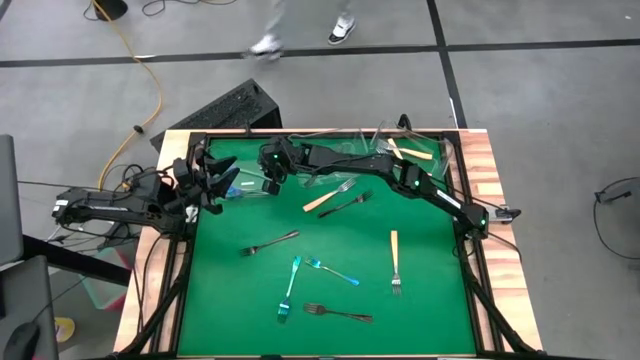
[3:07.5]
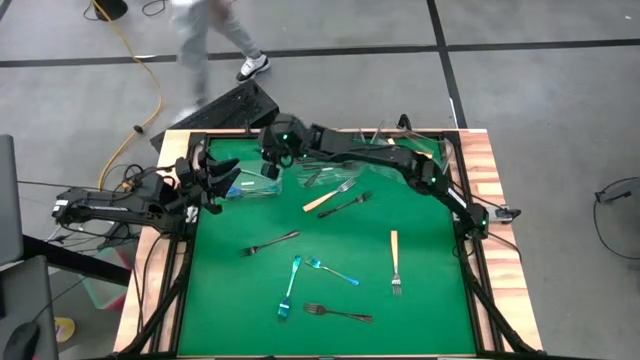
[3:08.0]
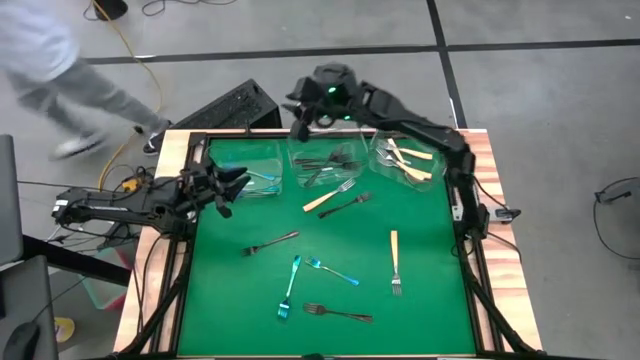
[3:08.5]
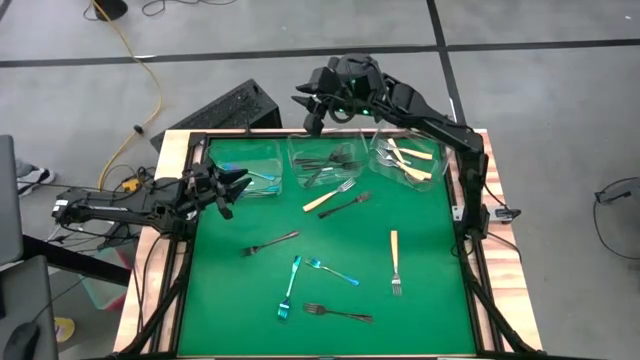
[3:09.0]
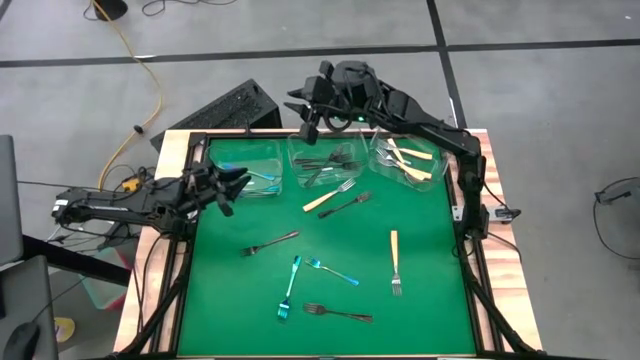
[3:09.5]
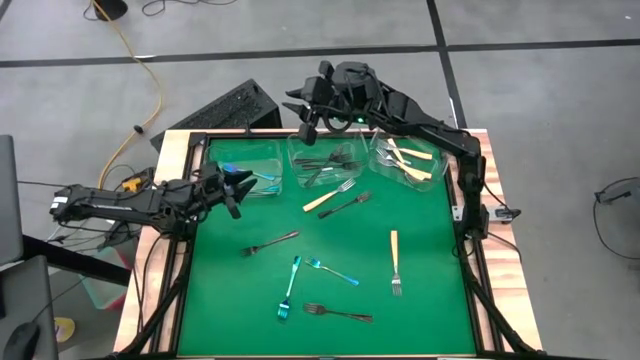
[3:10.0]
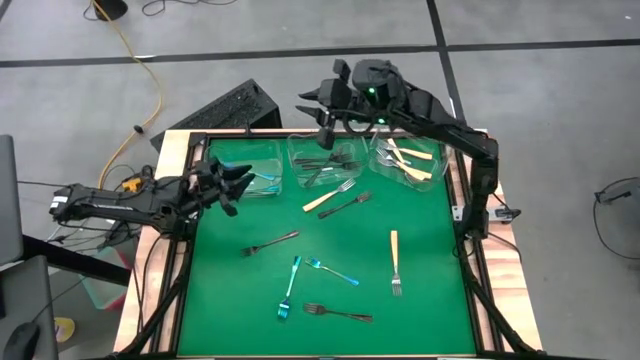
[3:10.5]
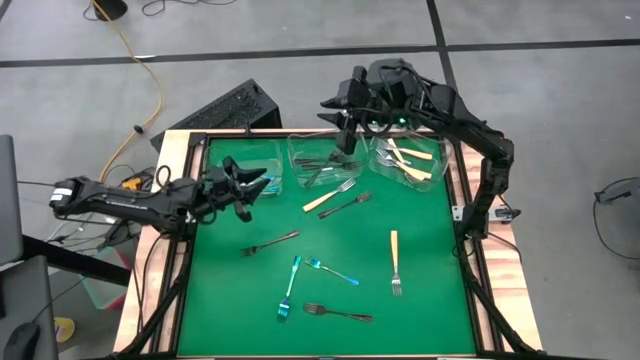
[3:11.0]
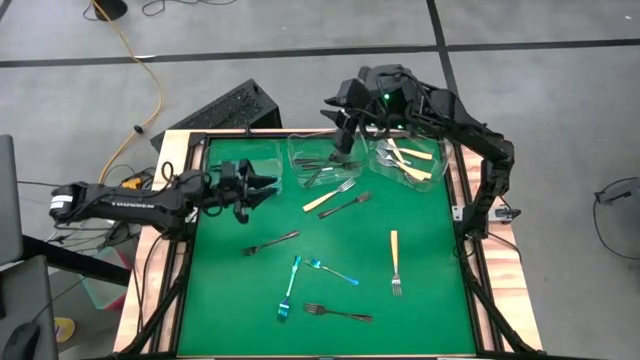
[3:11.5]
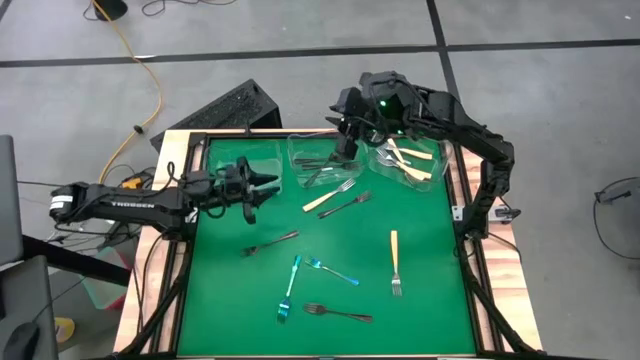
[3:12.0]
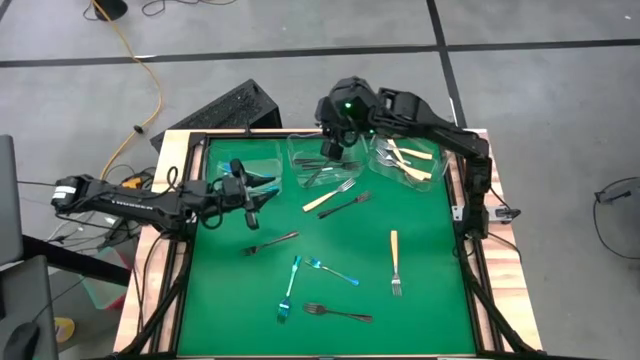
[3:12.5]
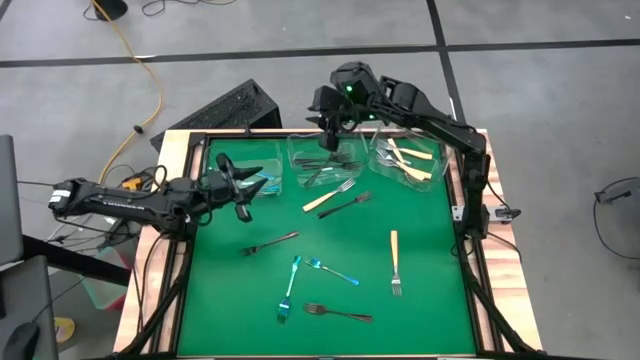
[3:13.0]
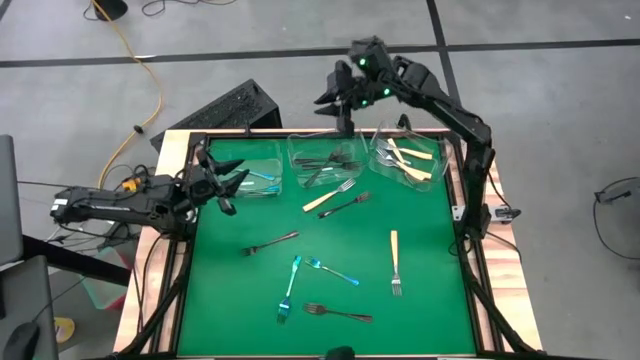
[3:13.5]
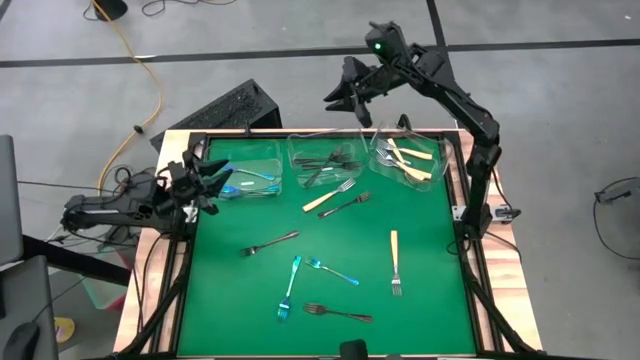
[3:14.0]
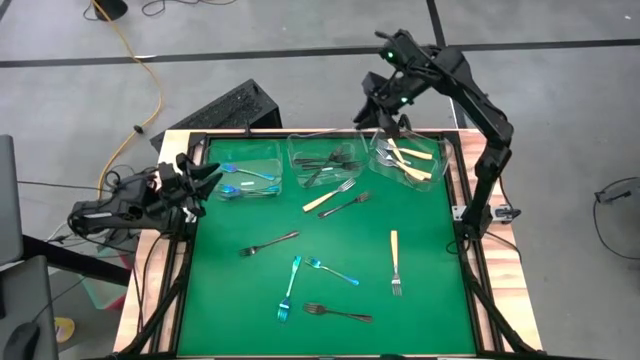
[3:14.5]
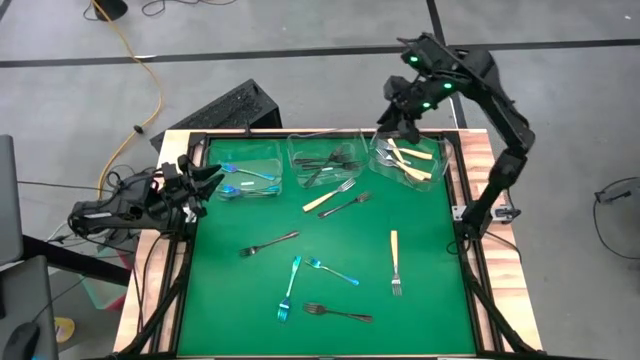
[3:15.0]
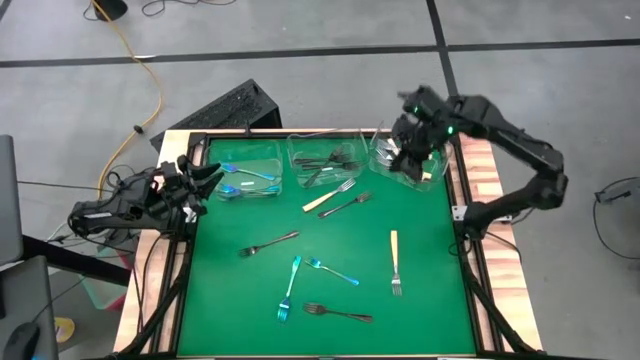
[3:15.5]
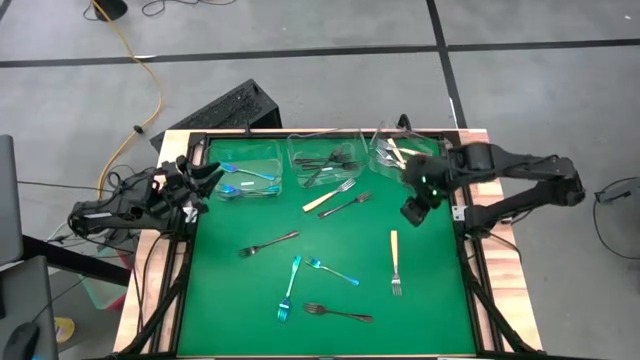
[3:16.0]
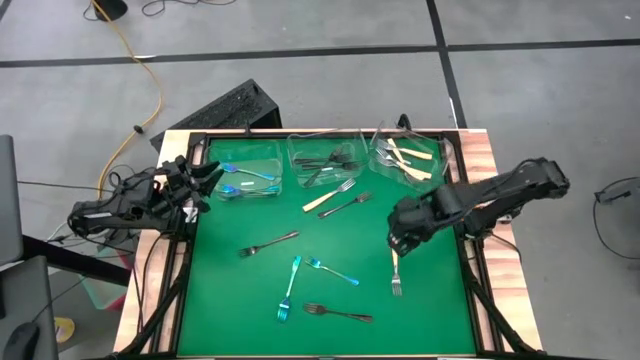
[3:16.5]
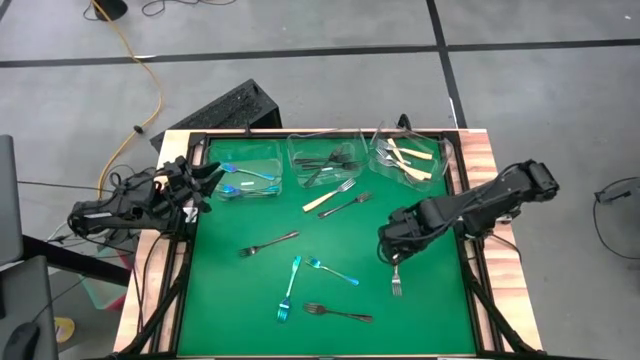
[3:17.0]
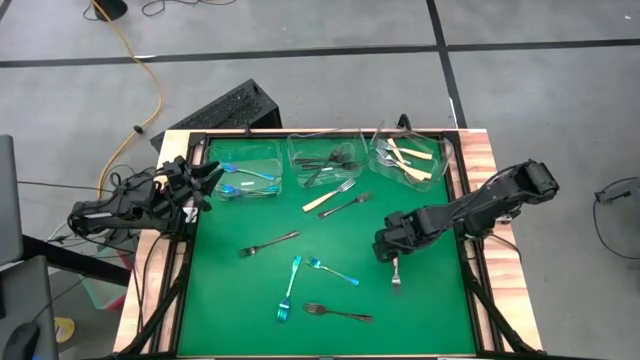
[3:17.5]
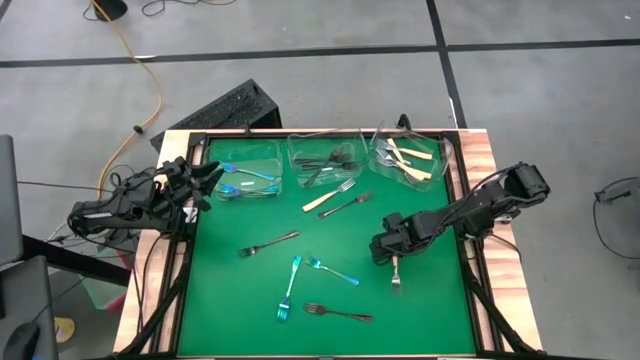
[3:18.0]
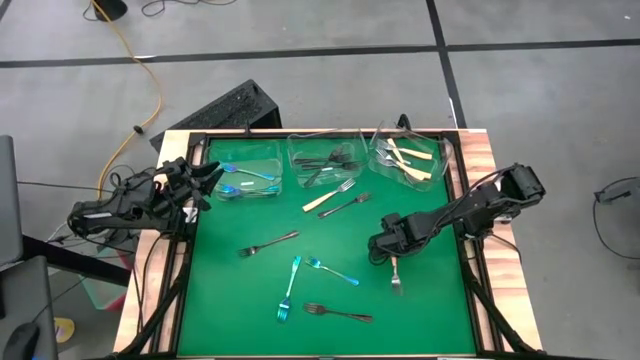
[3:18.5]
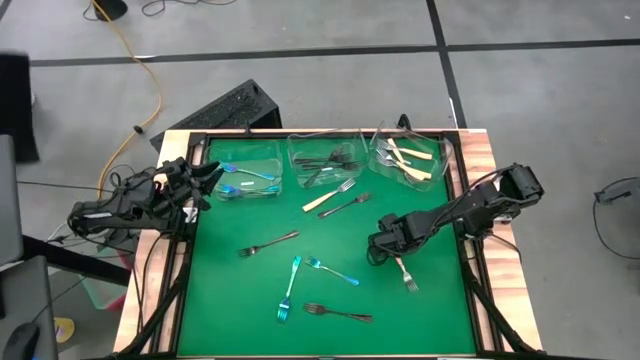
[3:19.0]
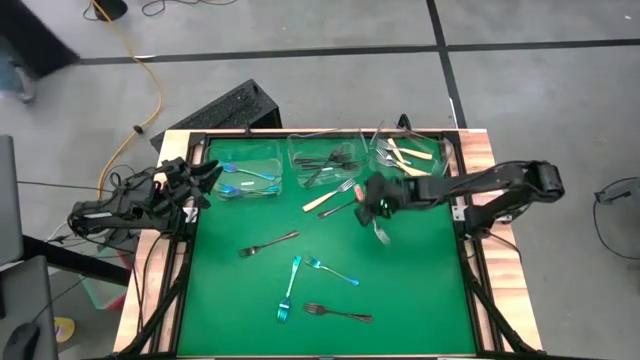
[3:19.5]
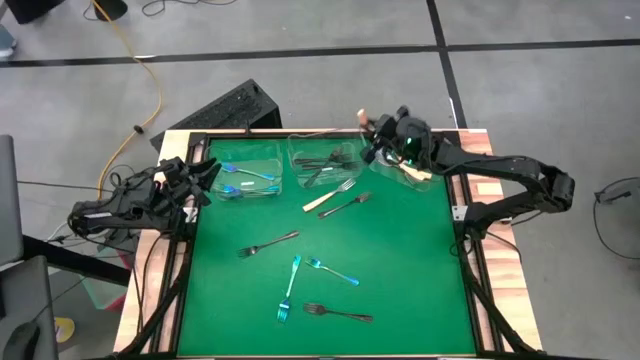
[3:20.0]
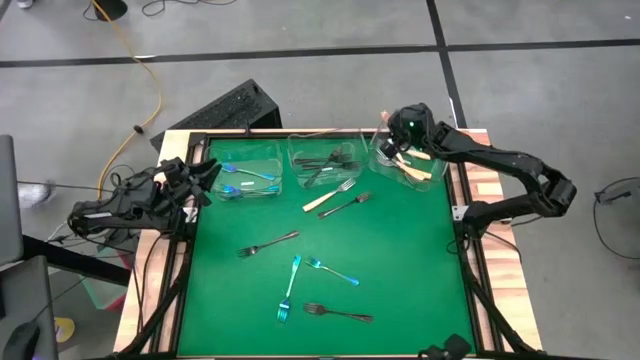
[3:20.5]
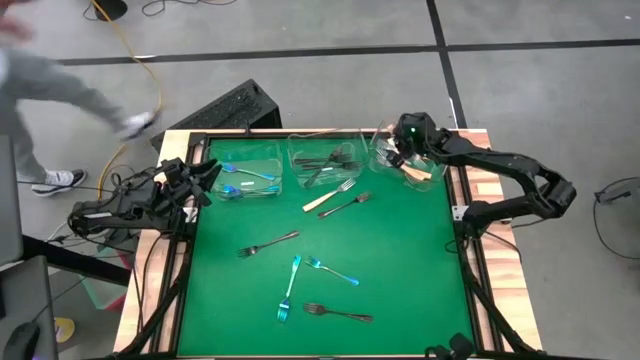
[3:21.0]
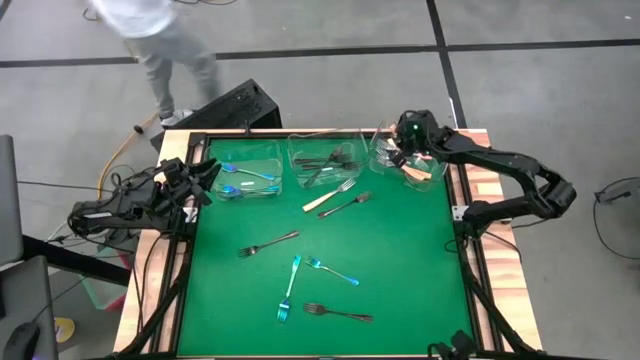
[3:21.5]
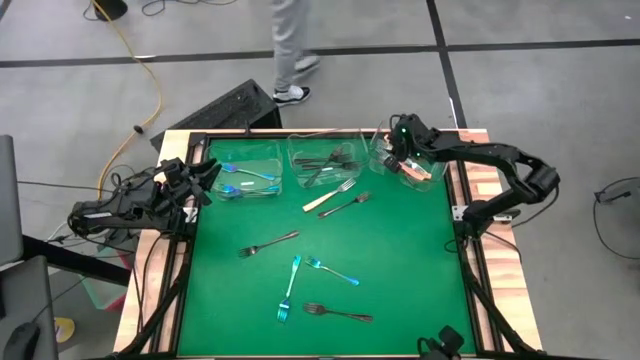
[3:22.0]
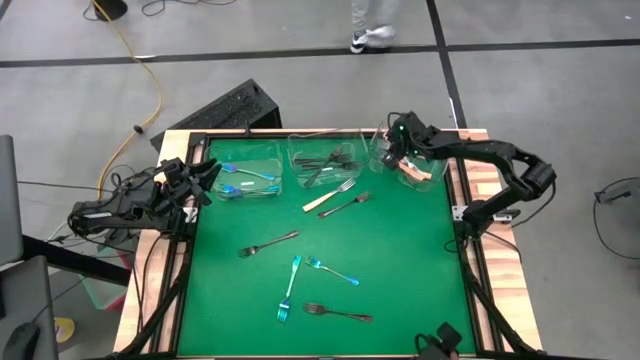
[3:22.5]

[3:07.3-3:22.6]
Task: Sort silverware by color (type)
Put the yellow fork into the right transparent bin

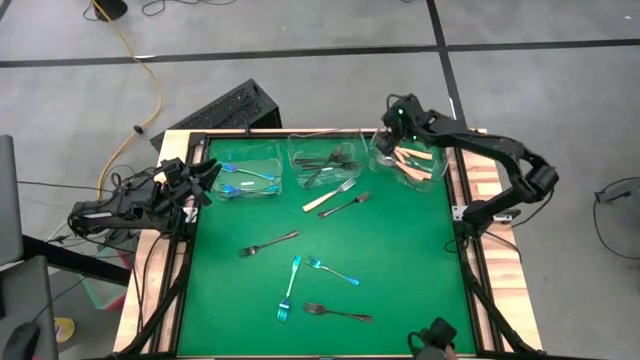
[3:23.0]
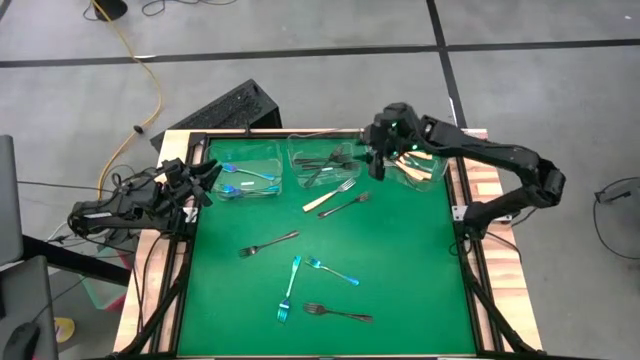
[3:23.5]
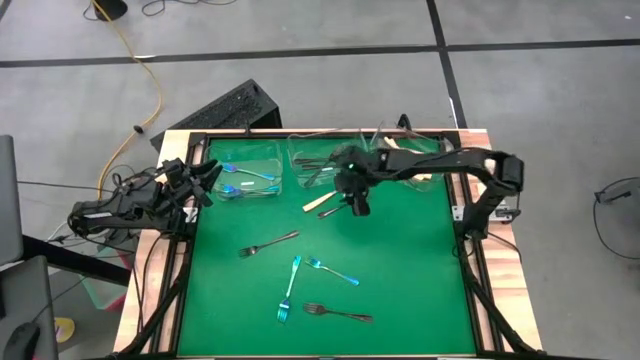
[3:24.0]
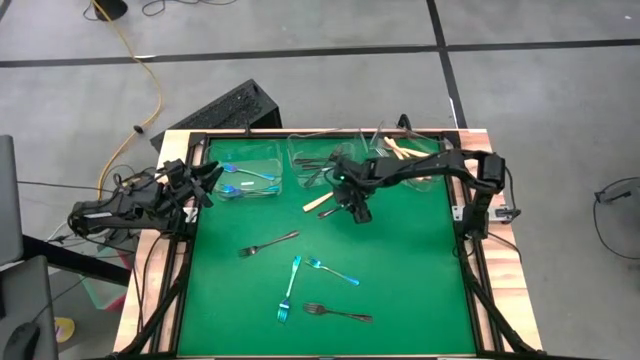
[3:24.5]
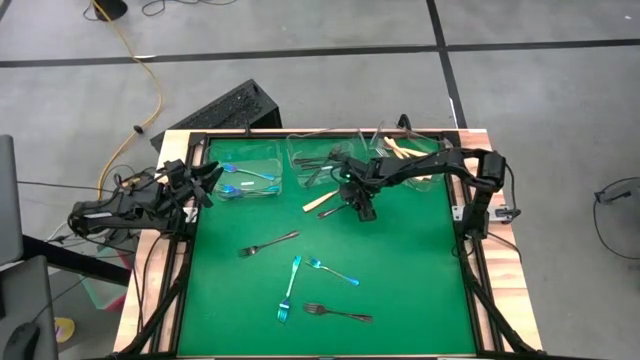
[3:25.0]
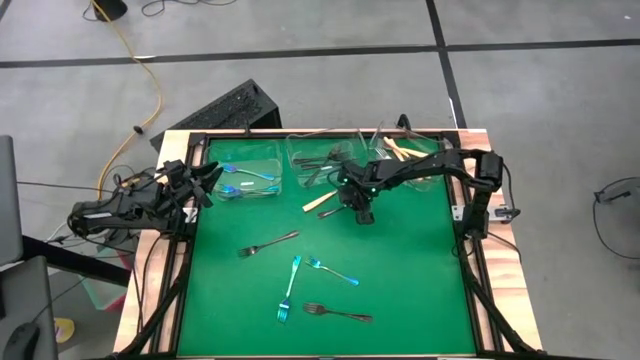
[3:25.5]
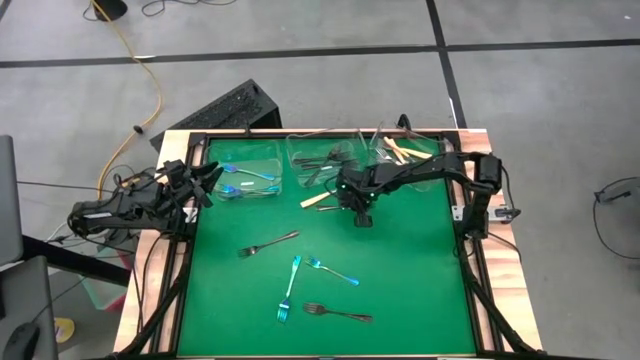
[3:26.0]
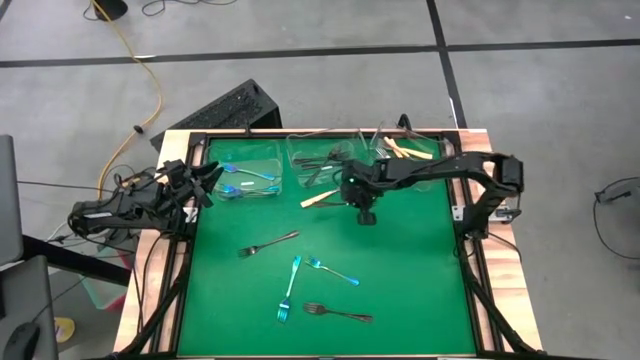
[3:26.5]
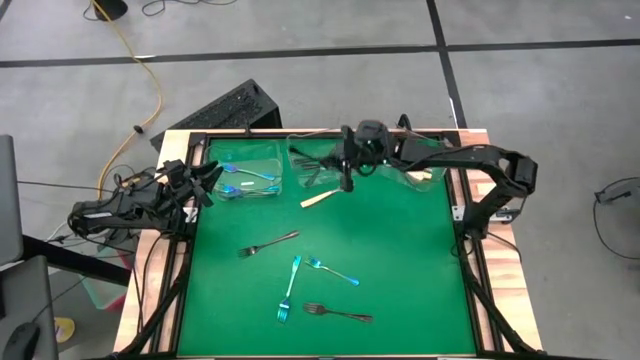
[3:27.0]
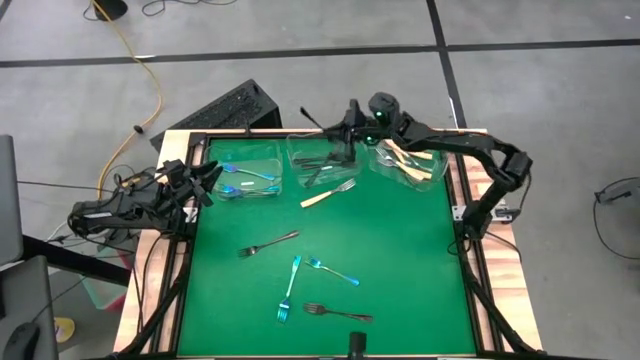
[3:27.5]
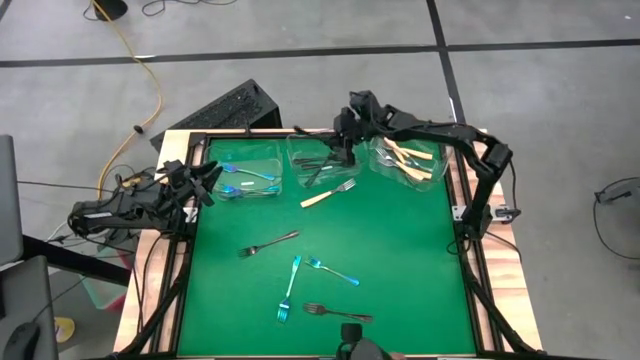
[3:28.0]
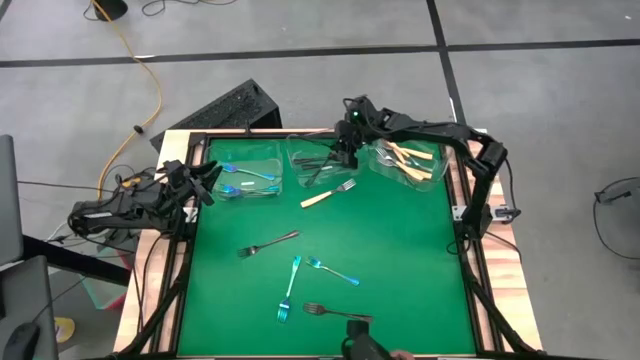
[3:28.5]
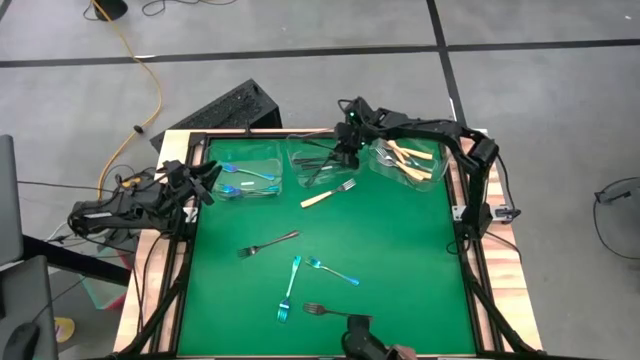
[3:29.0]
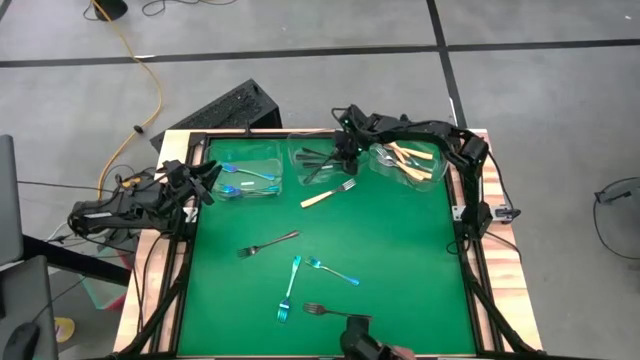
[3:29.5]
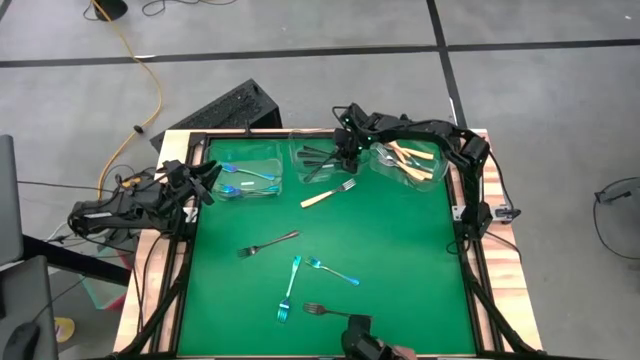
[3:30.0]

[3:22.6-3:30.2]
Put the brown fork into the middle transparent bin
